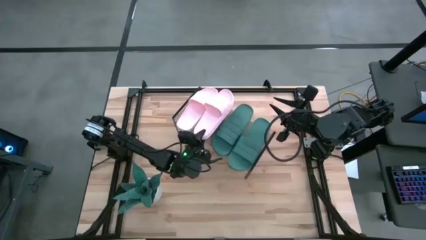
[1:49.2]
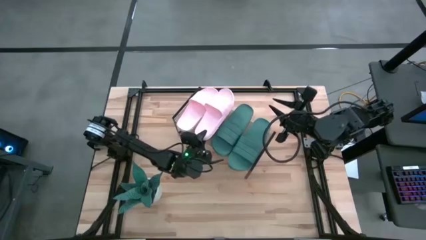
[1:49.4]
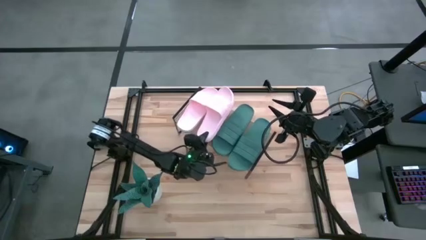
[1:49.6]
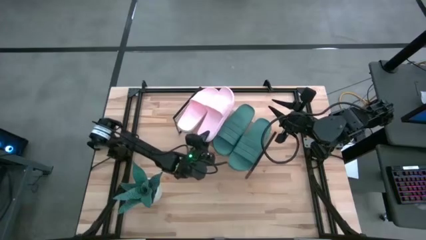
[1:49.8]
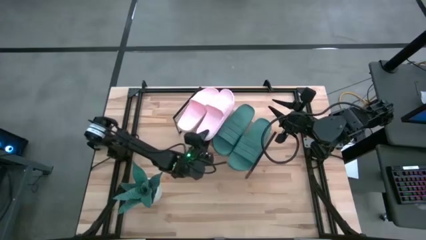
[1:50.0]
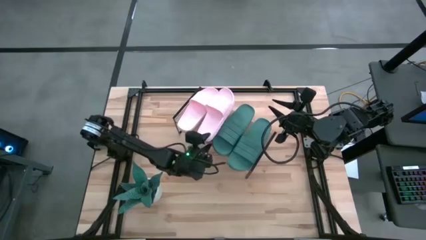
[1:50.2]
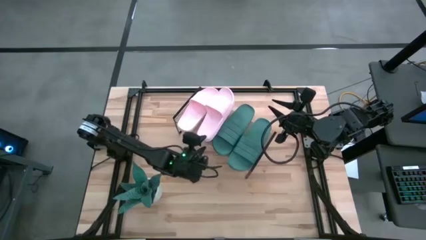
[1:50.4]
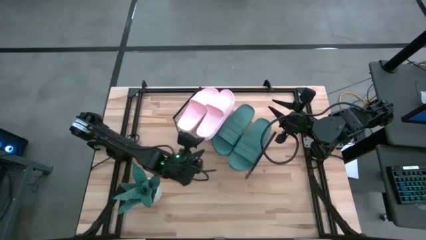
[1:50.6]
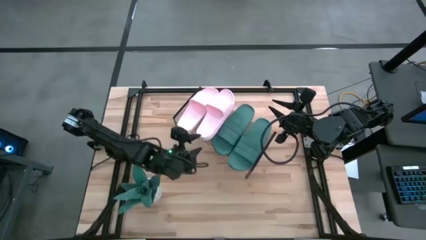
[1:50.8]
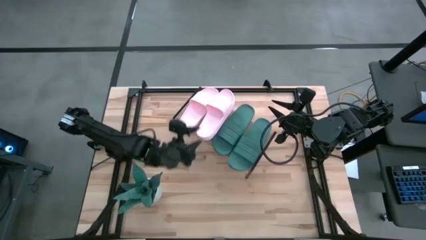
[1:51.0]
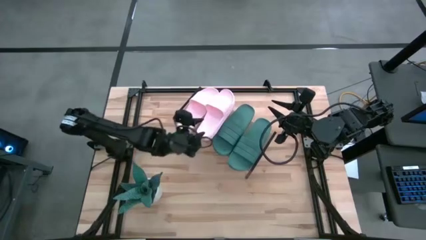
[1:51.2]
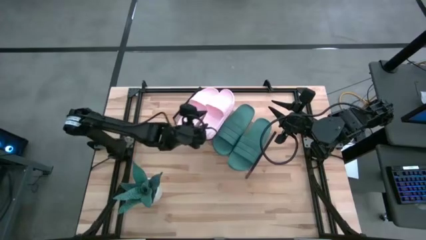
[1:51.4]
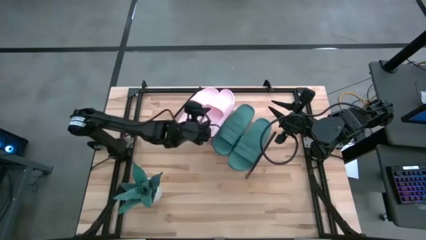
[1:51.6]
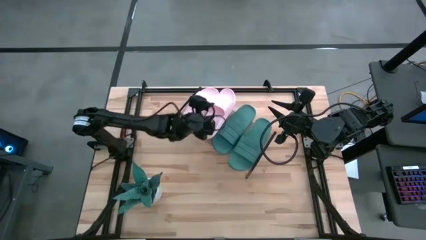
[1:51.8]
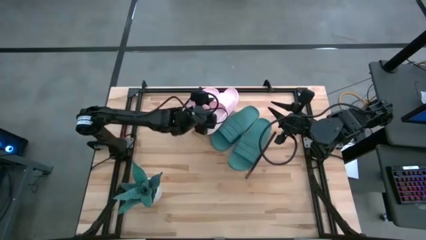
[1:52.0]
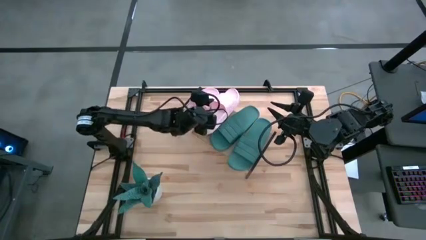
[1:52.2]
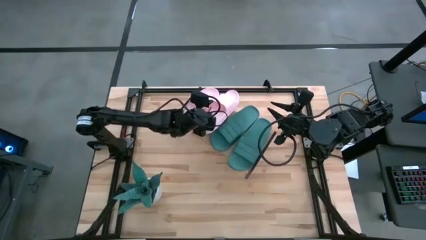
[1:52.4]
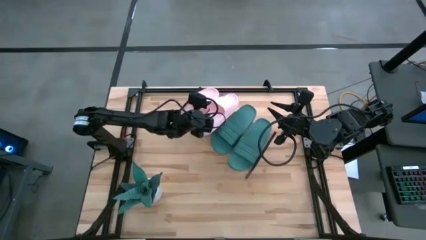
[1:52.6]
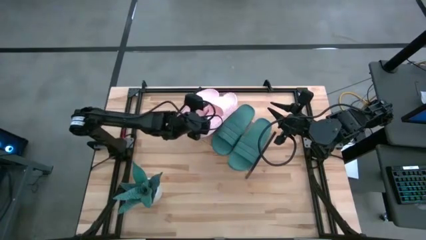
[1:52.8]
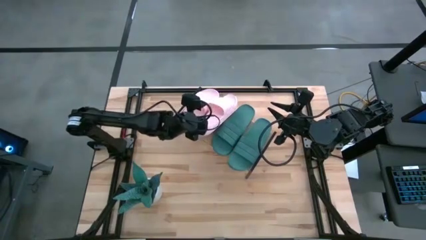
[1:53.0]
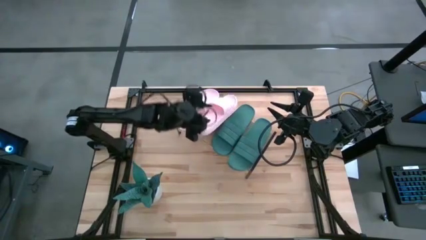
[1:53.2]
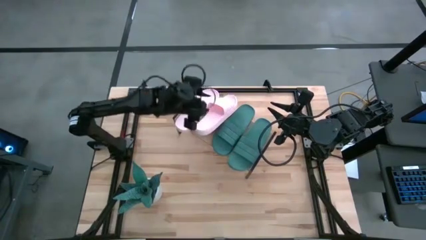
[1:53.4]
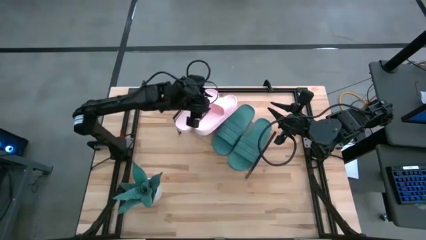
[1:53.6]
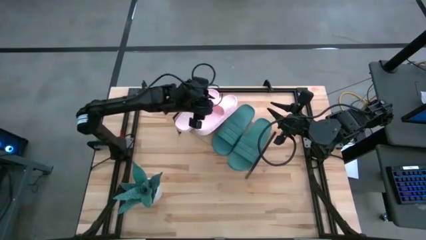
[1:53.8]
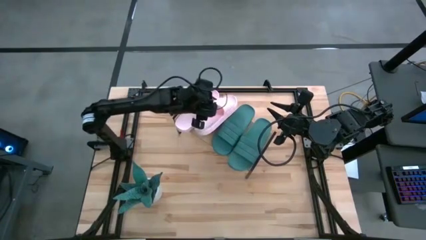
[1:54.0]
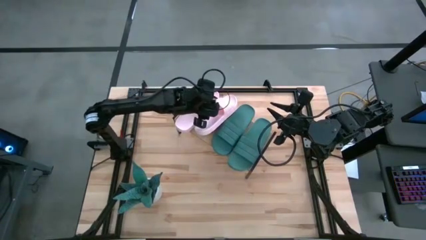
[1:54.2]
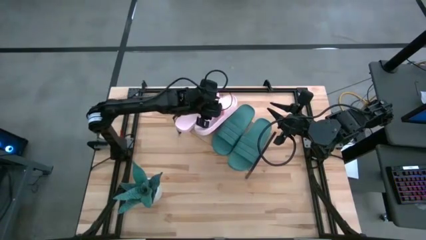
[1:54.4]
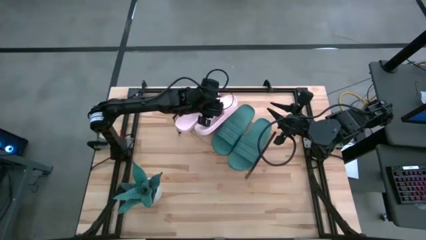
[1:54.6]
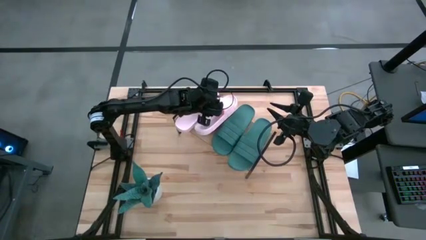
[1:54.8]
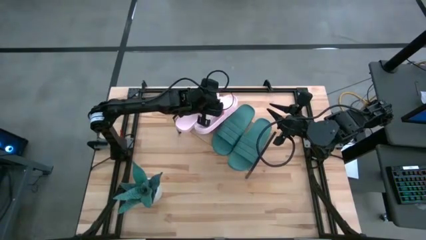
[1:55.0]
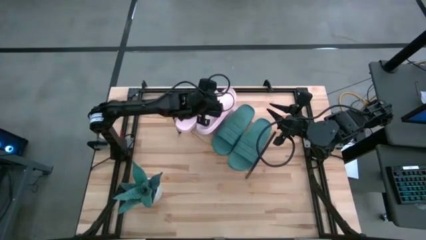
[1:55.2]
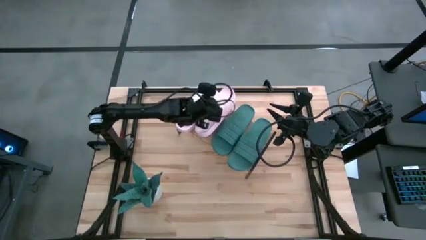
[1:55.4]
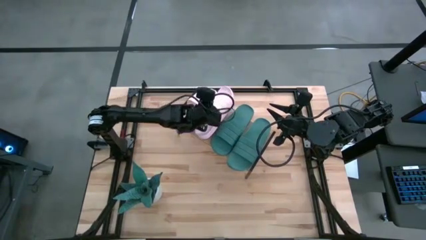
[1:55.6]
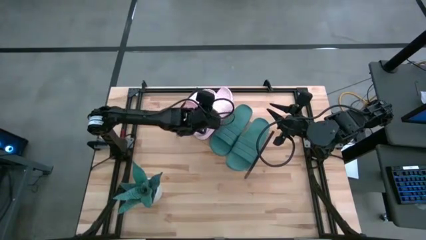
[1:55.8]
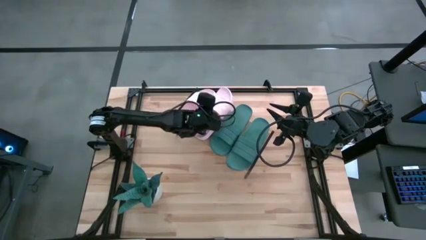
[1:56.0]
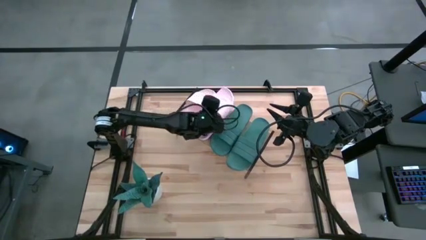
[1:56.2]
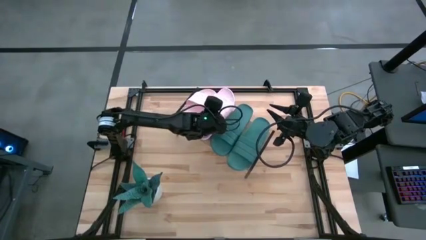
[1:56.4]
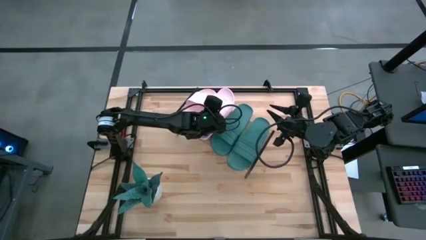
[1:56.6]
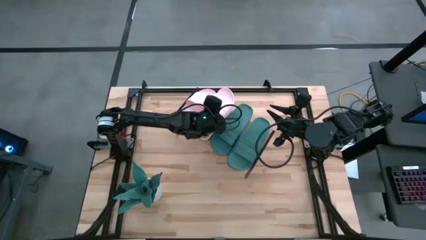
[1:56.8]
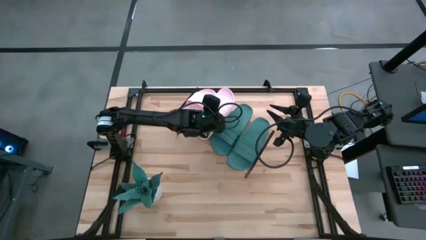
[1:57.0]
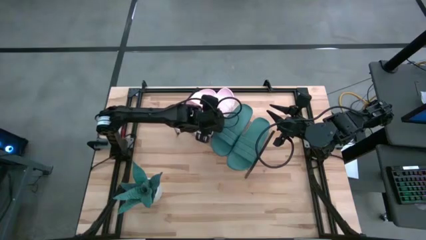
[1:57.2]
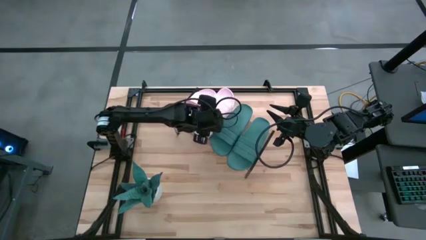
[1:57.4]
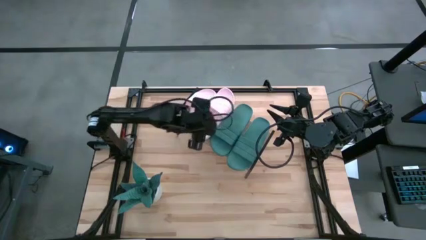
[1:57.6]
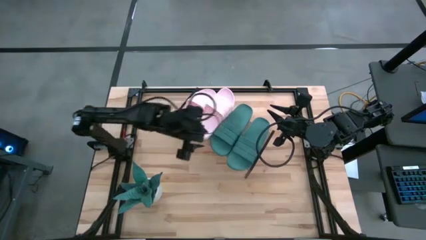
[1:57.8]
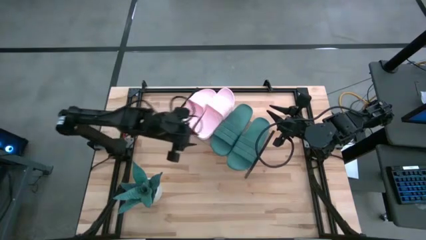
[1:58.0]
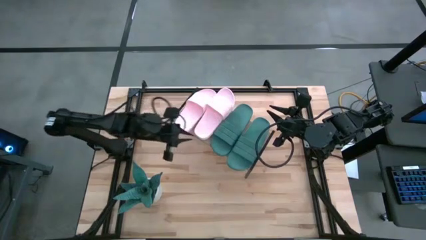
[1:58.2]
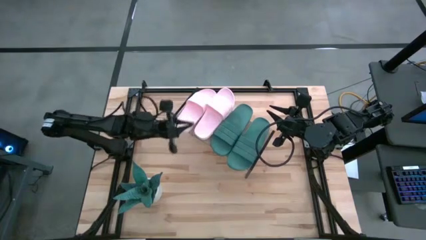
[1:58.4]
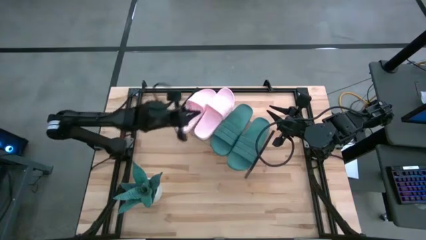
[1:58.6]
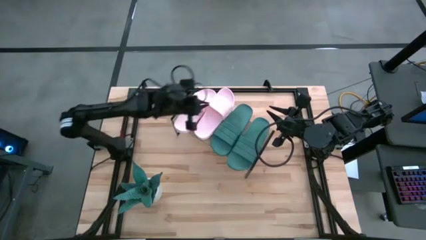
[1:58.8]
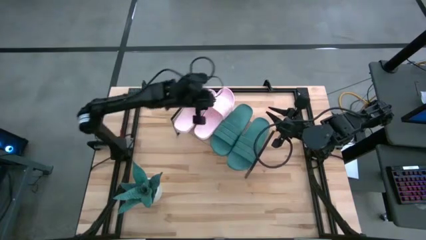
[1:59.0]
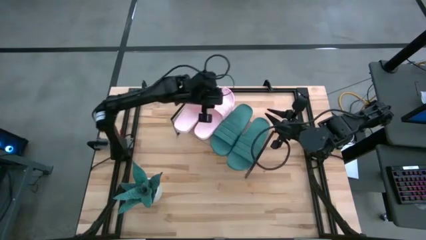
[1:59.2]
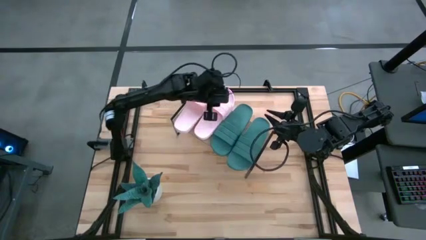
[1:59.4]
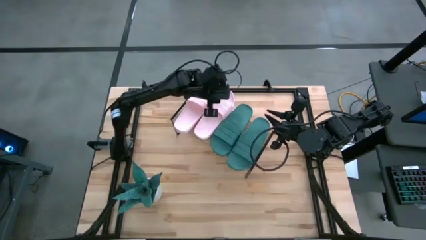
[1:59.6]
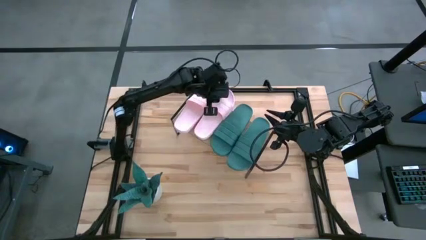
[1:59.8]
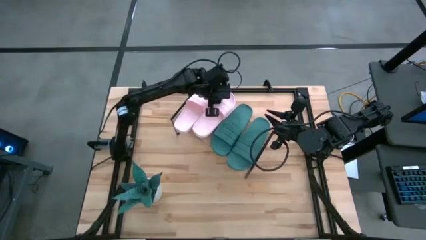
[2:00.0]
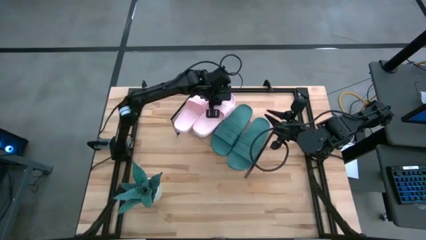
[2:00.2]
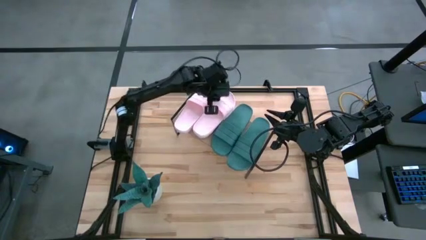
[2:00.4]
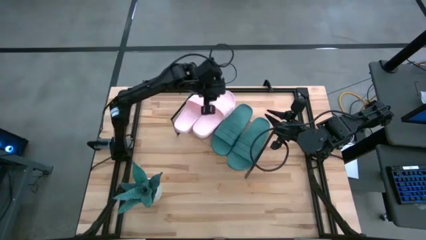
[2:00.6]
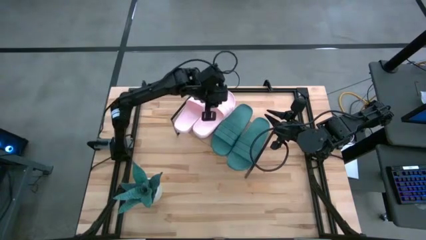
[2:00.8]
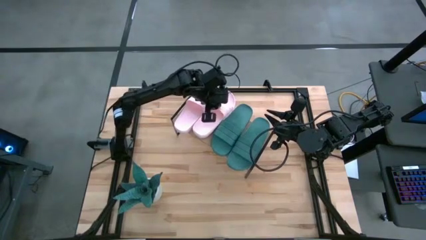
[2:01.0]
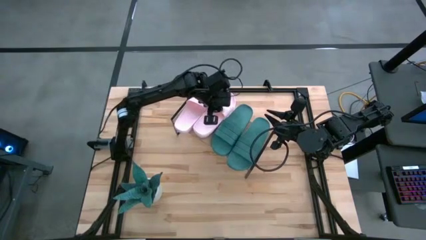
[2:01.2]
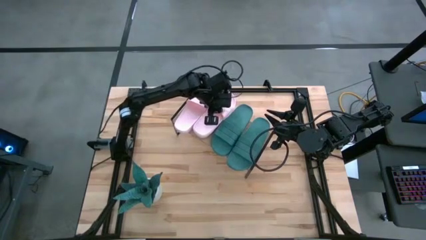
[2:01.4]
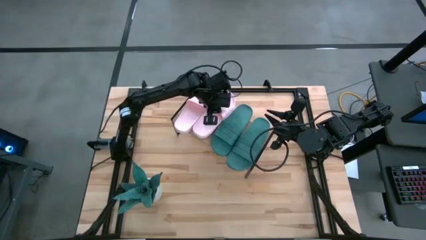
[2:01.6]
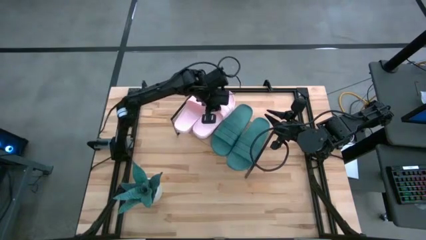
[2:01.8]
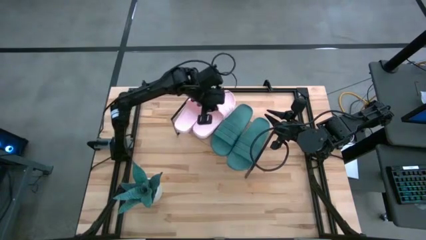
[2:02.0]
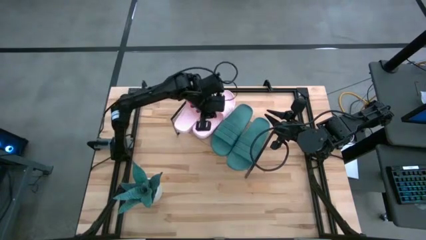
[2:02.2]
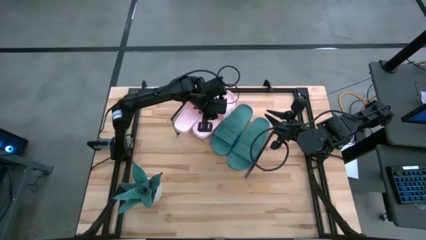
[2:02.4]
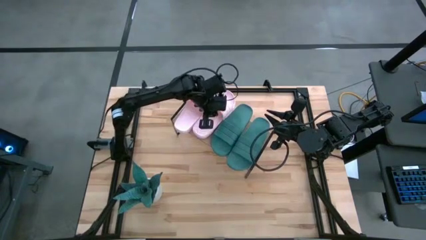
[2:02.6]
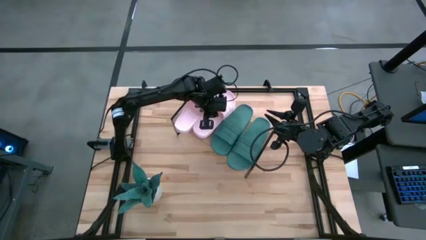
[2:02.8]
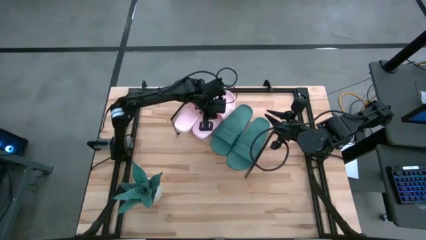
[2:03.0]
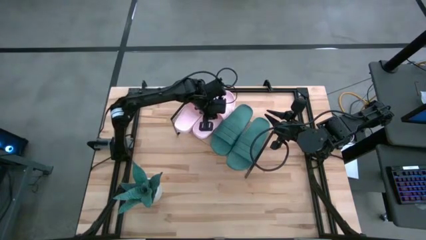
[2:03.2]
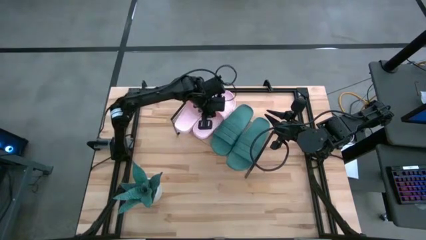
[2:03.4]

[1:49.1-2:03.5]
Task: Pick and place slides into the shelf
Put the pink slide on the shelf
